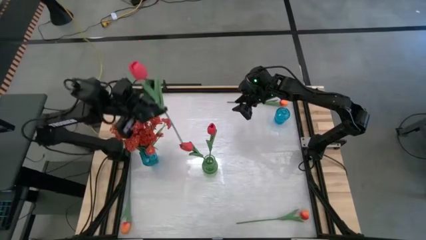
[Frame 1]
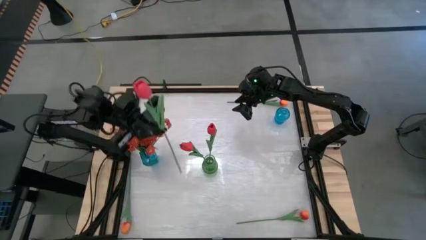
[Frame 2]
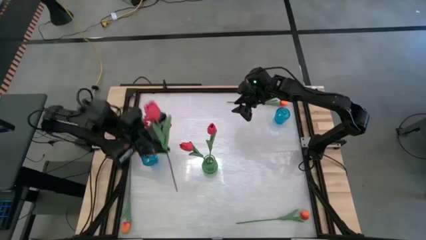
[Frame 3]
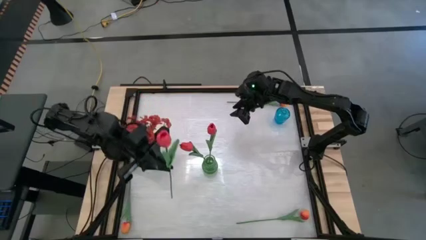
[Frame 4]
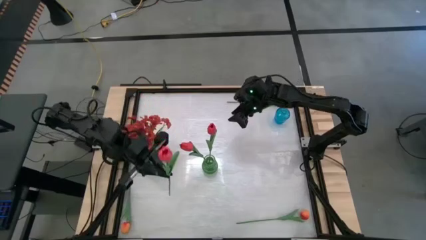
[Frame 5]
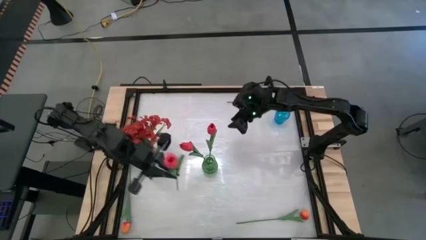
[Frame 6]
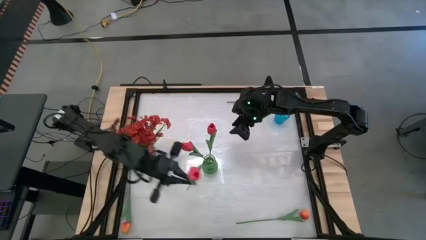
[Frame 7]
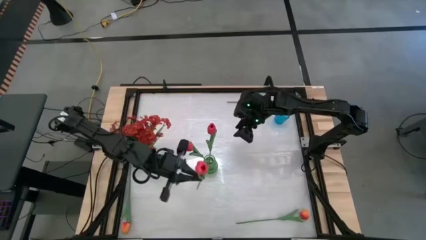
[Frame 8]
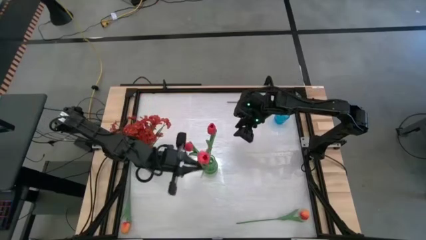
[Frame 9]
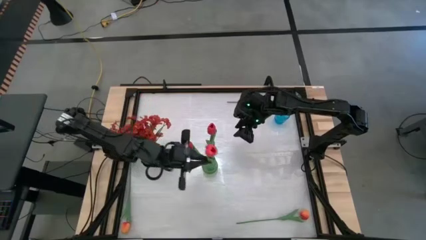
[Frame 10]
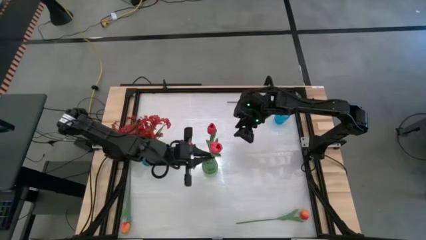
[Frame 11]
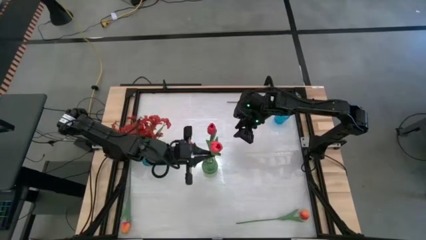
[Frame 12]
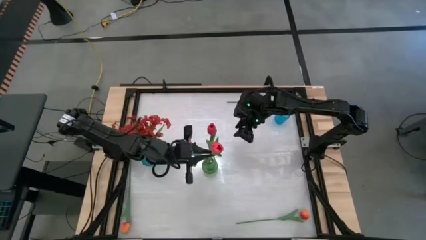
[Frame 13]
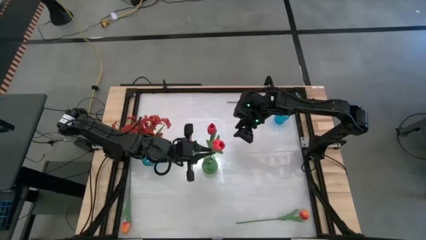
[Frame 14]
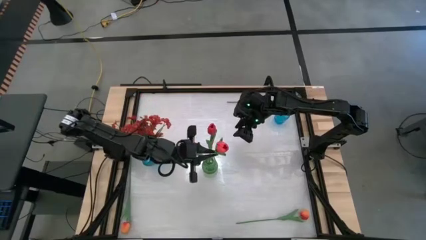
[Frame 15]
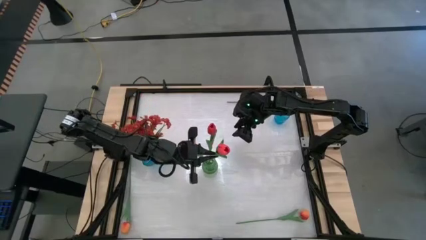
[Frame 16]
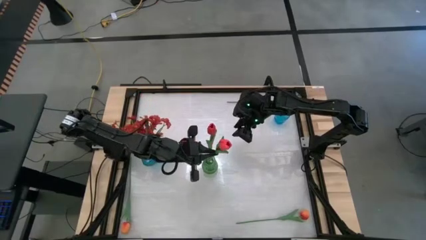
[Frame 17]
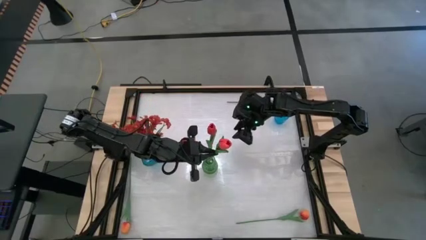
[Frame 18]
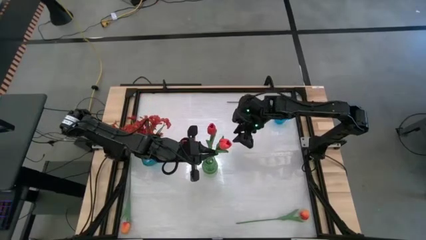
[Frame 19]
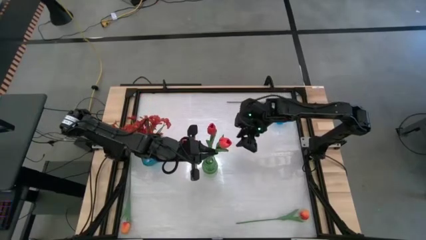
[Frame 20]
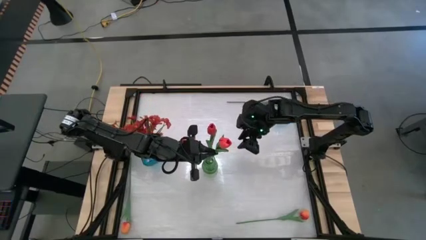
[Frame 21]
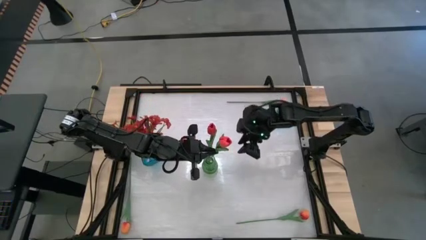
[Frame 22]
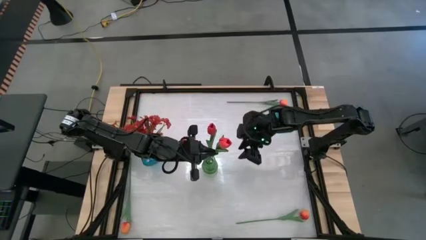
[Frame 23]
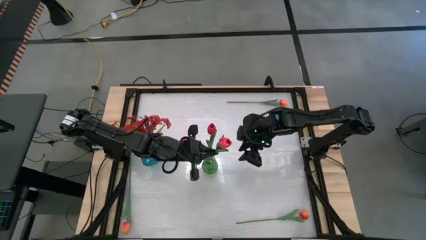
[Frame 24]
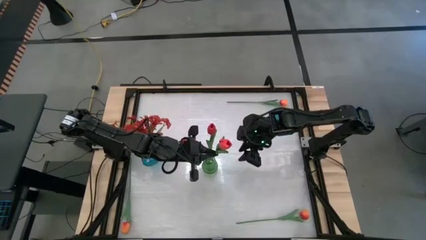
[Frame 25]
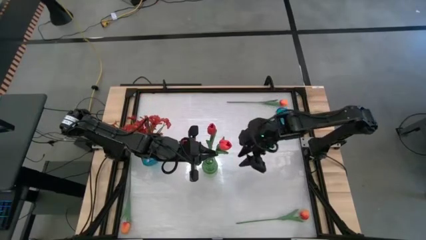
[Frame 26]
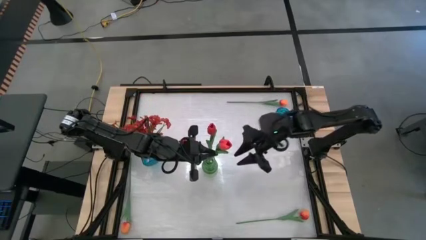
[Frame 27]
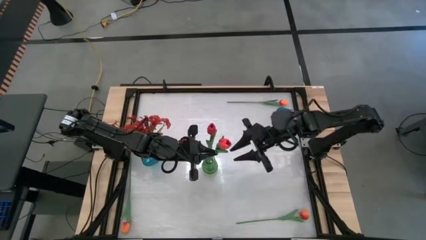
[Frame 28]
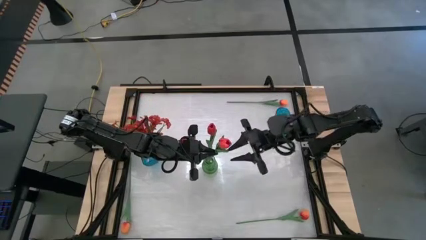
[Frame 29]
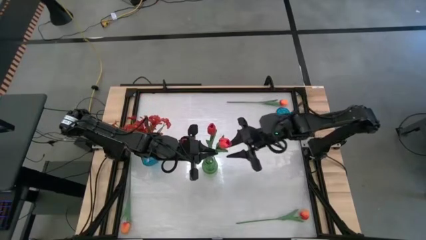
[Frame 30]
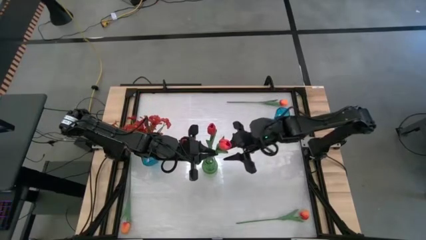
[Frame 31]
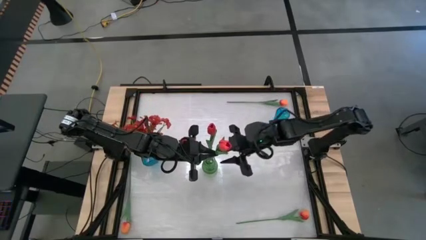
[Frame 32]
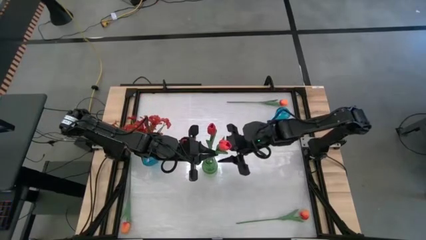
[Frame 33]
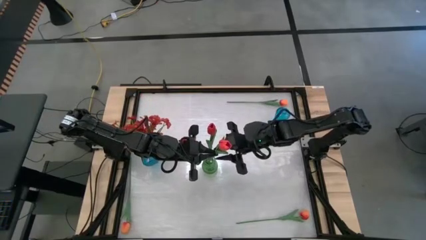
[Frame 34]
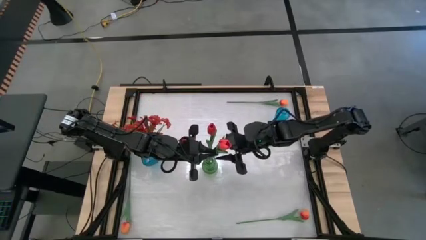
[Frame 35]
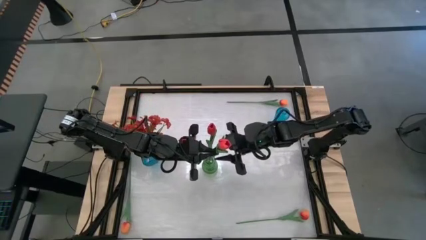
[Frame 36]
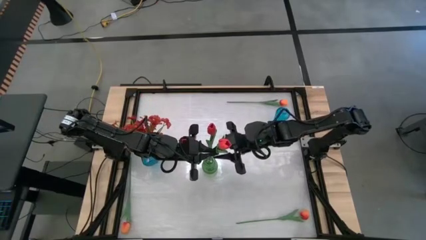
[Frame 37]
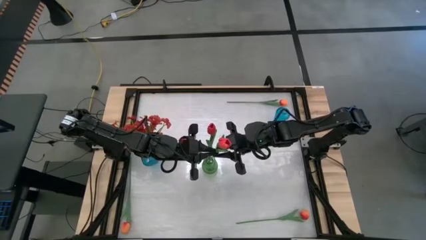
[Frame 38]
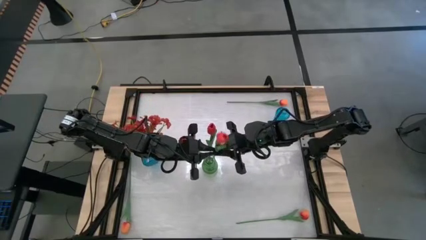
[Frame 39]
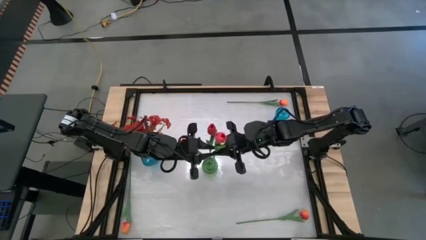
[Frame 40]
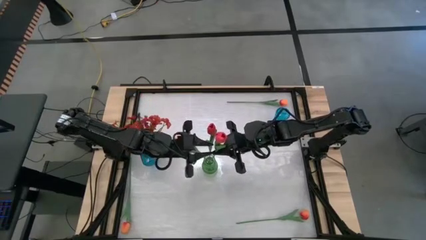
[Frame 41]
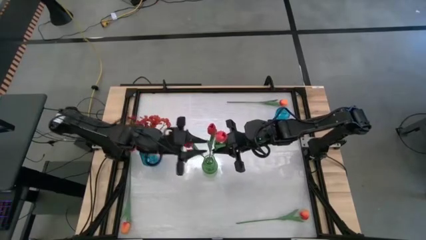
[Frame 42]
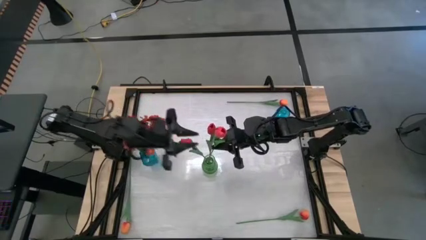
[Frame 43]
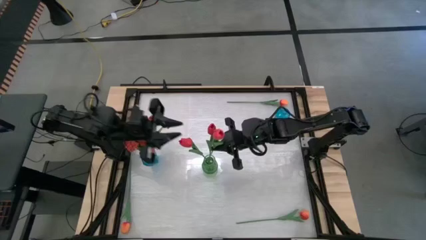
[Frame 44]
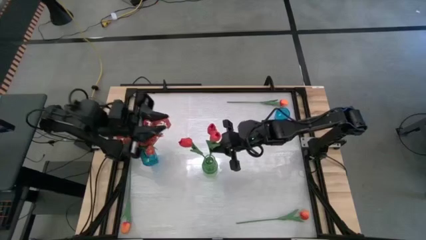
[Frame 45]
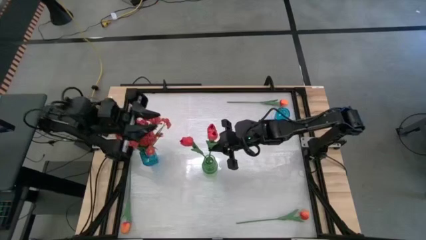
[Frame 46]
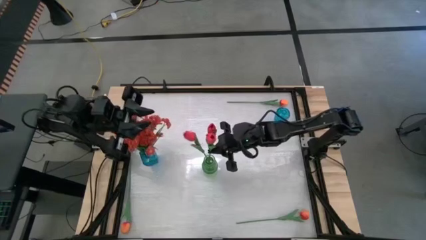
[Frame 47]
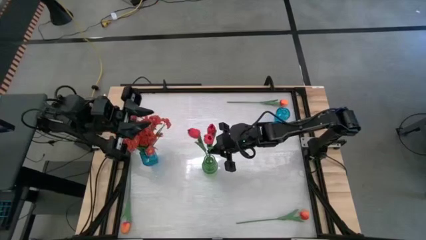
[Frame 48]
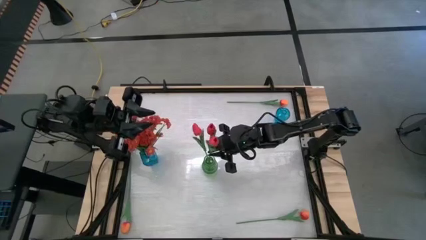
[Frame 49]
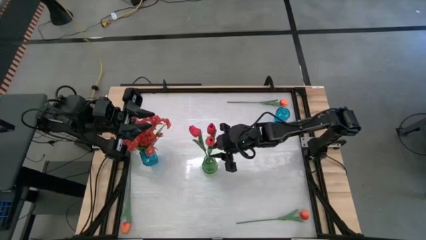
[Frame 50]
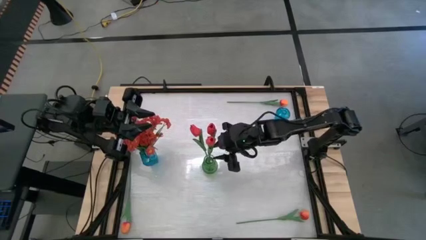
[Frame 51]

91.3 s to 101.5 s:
Task: Sort flowers into vase by color
Put the pink flower into the green vase

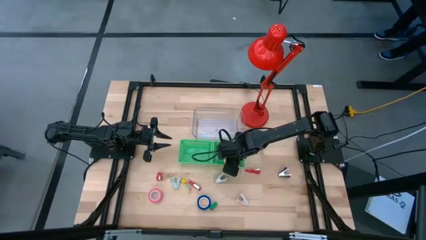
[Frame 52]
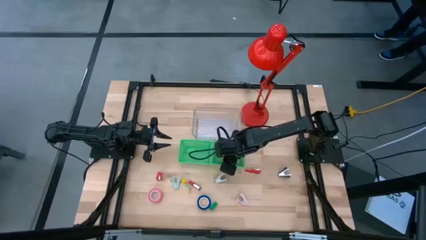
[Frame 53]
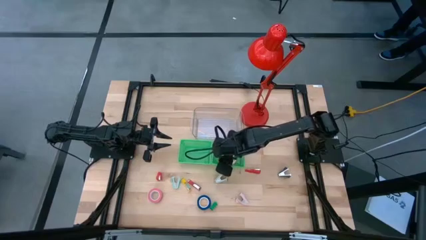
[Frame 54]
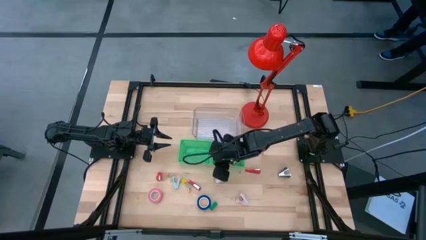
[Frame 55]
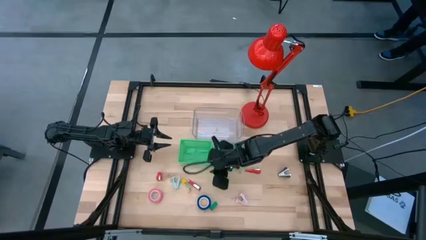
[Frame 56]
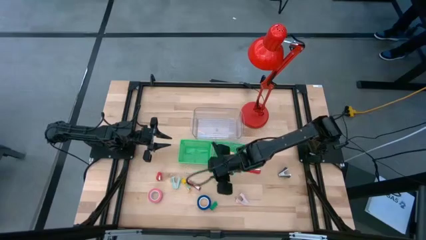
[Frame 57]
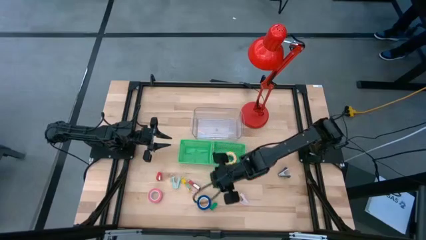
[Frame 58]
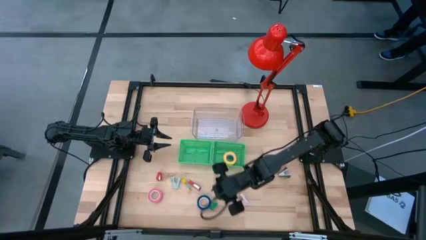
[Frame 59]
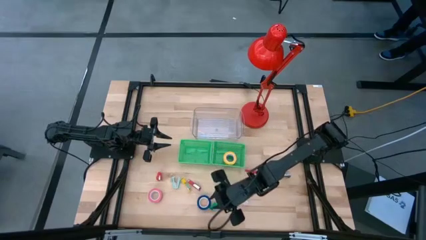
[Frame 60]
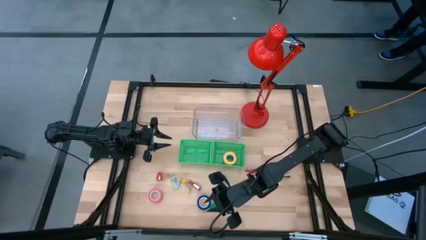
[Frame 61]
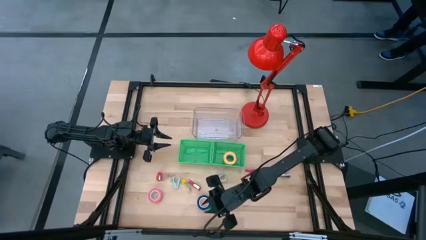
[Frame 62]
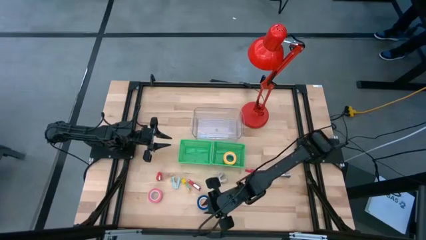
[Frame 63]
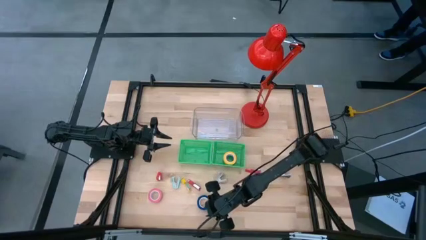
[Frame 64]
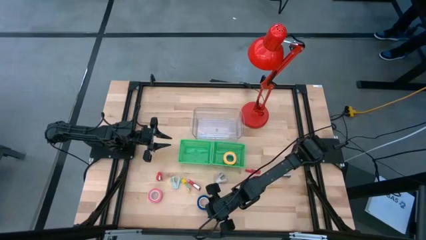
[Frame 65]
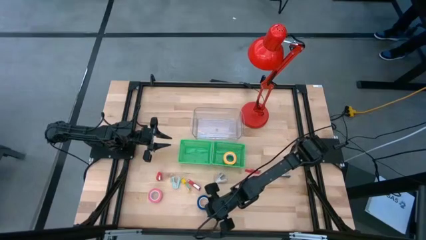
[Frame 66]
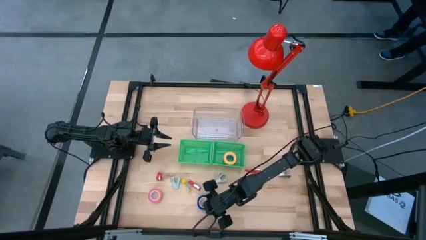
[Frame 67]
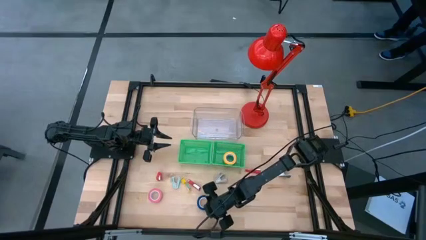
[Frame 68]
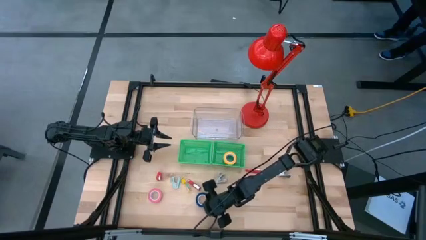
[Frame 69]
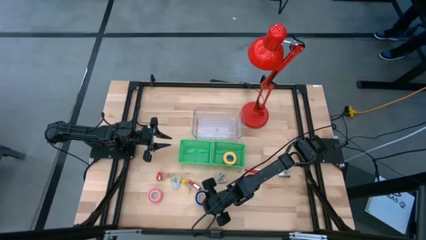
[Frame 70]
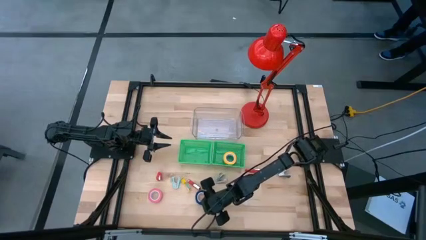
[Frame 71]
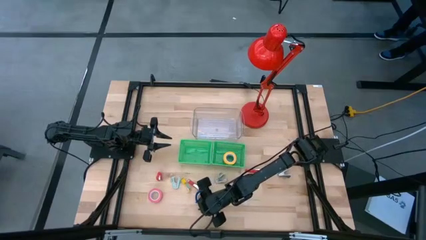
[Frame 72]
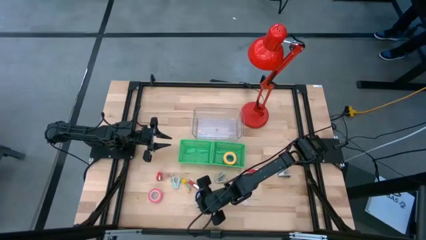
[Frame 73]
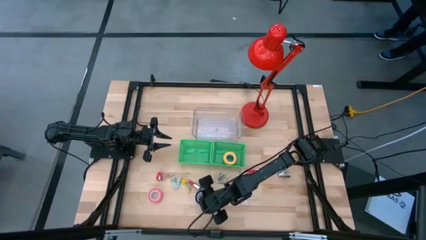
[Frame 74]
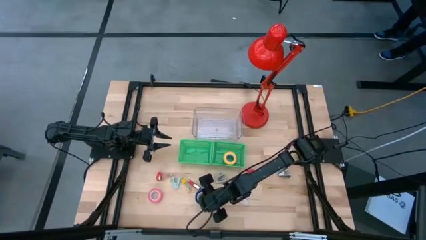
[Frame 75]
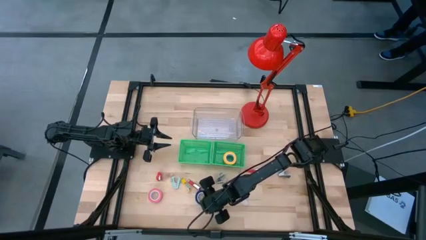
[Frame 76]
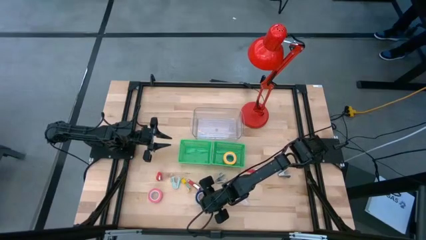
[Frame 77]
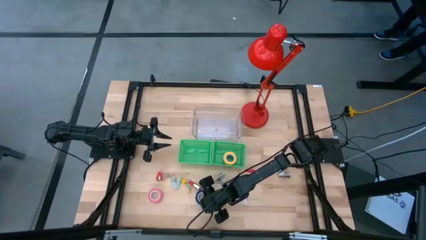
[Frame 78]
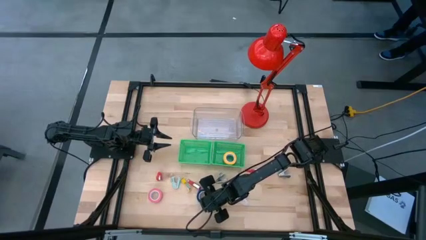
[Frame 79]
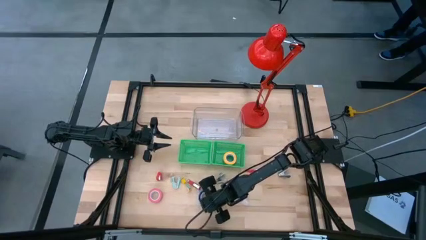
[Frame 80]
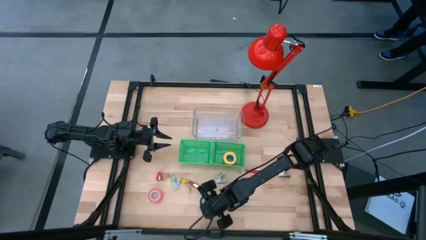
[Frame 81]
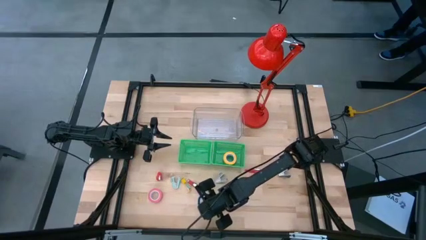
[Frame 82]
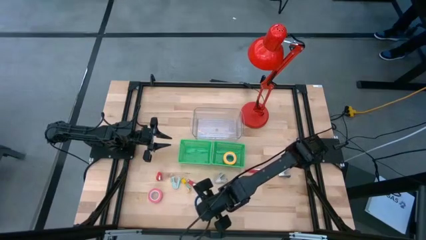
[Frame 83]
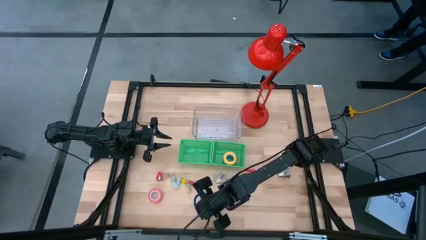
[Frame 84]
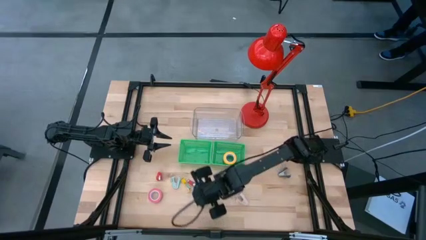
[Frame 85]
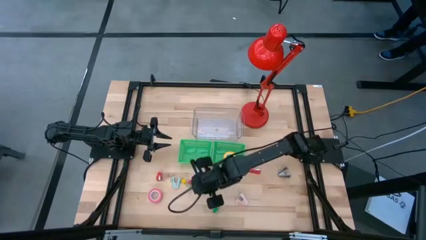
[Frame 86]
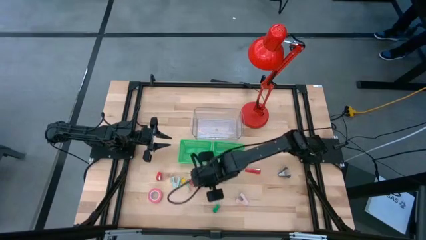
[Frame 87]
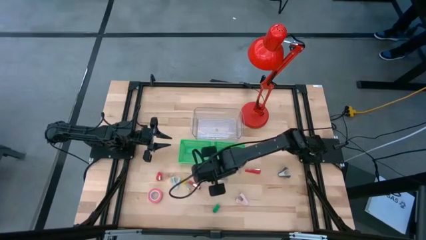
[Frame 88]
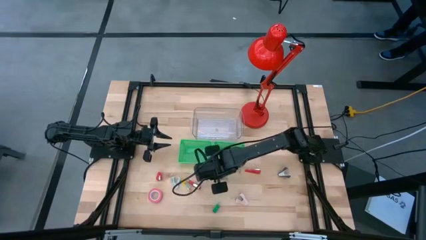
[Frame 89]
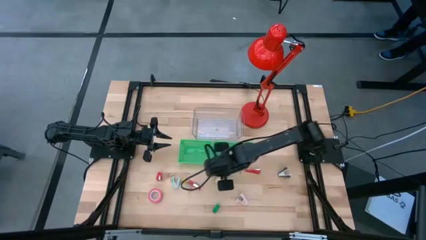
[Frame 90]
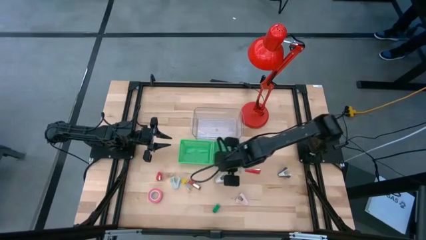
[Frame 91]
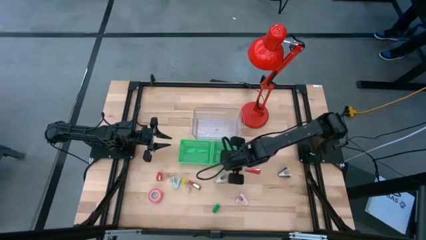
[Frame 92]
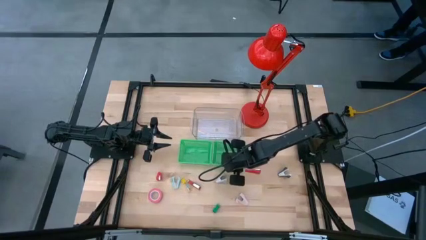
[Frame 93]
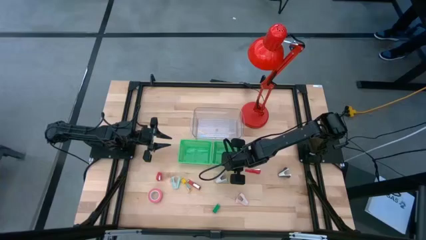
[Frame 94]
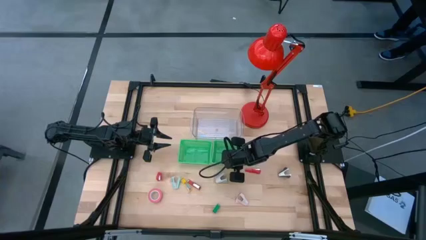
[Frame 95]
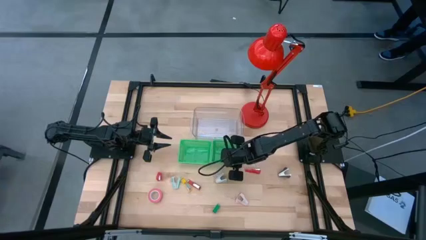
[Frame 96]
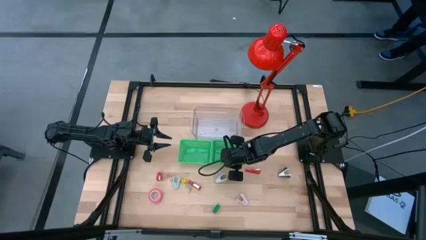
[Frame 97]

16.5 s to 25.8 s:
Task: Pick and place Stapler, Stapler remover, tape
Put the blue tape into the right green bin
